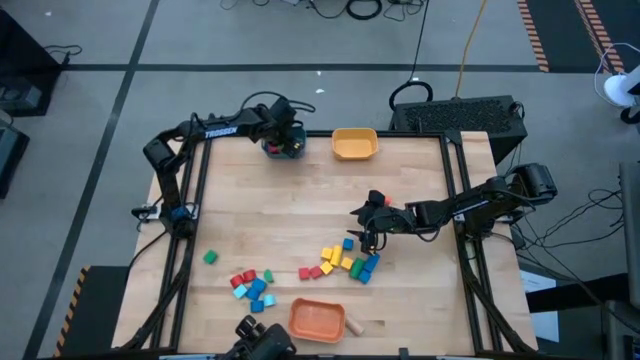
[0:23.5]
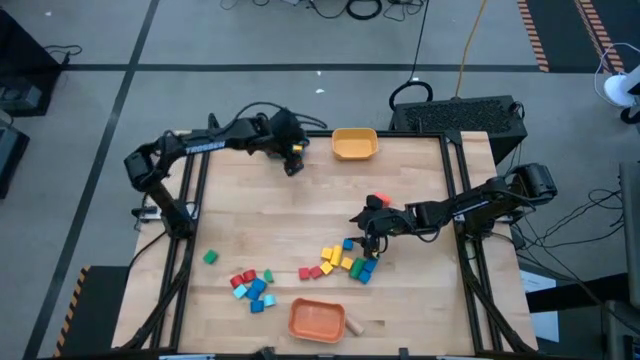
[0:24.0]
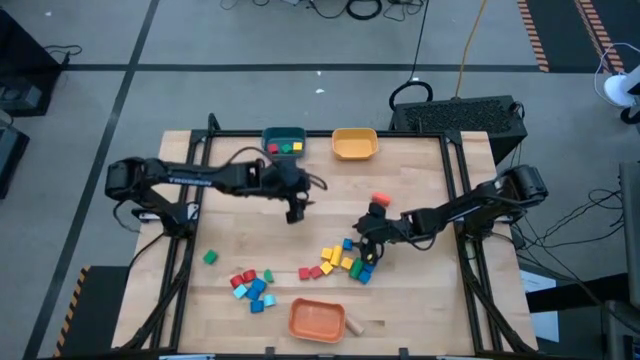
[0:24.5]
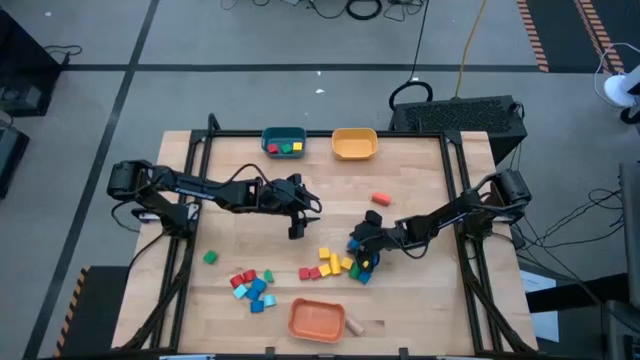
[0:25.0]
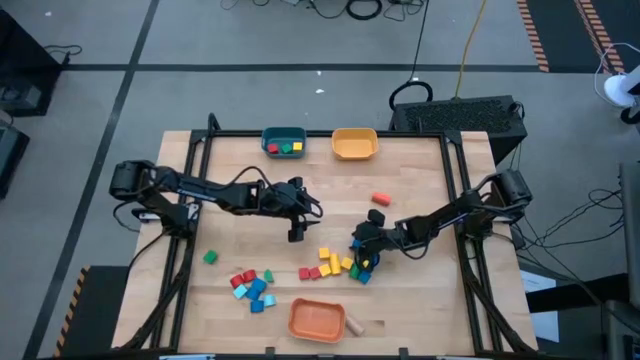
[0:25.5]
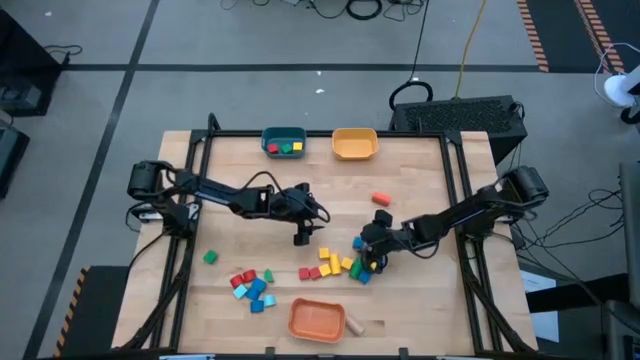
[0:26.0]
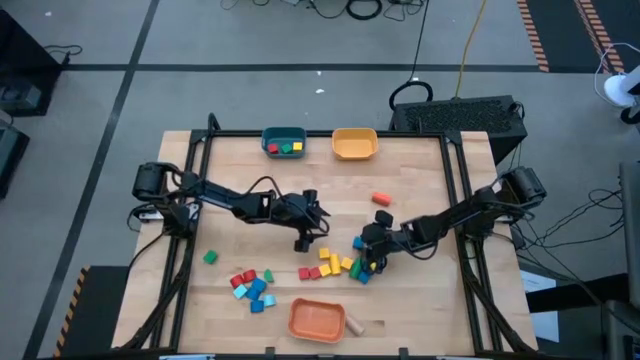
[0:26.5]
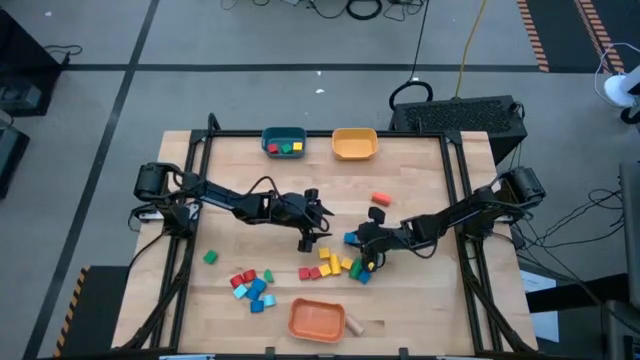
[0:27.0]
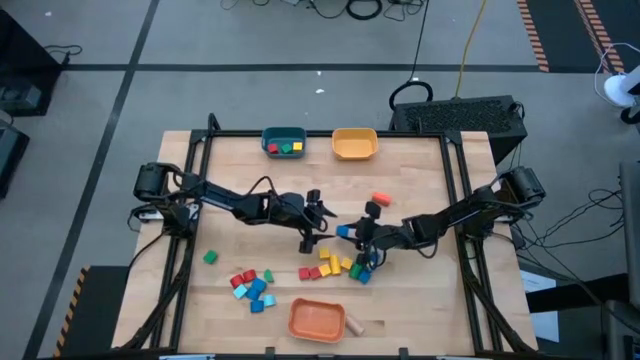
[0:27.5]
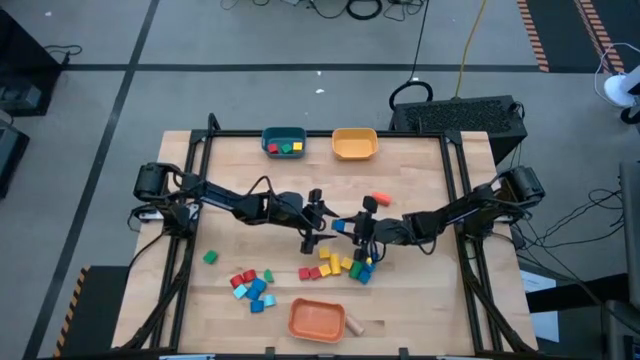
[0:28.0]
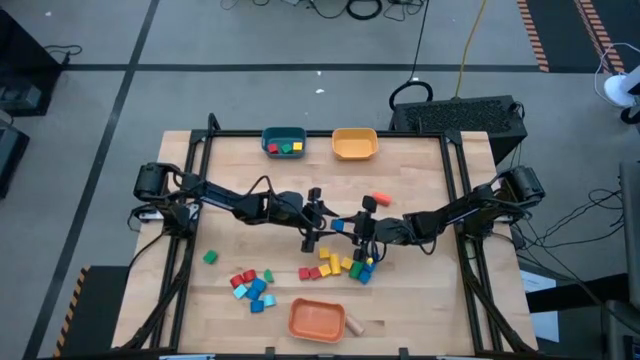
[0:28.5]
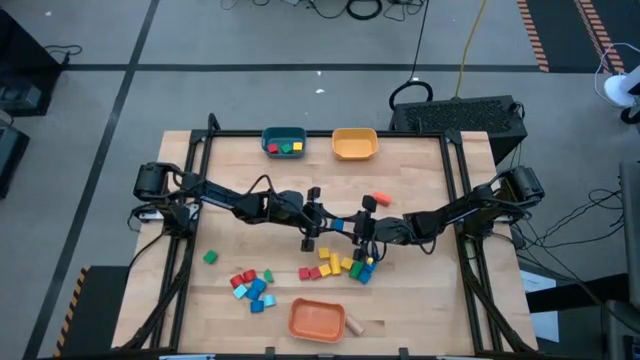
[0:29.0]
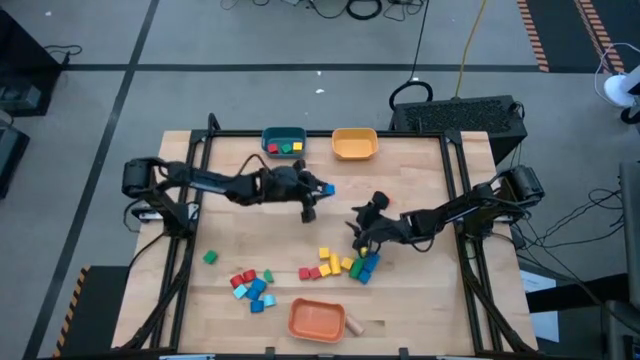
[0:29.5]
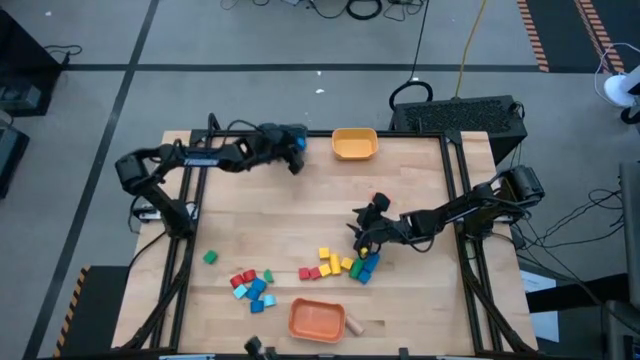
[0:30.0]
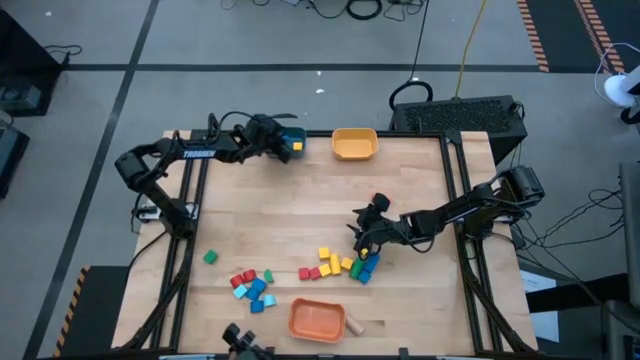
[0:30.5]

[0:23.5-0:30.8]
Task: Sort blocks by size
Put the blue square block into the blue bin

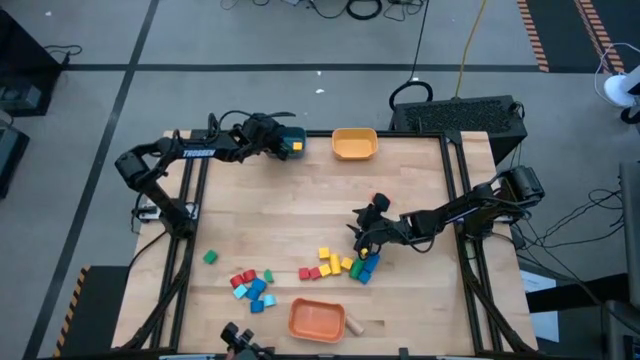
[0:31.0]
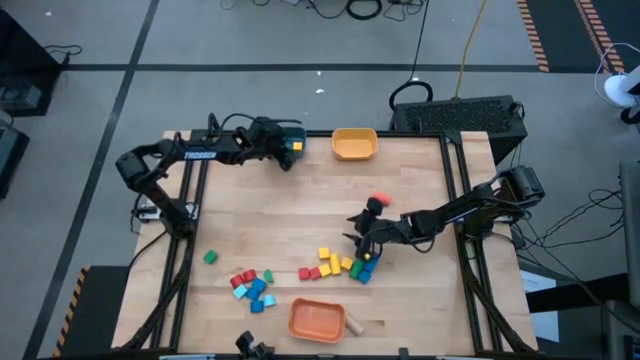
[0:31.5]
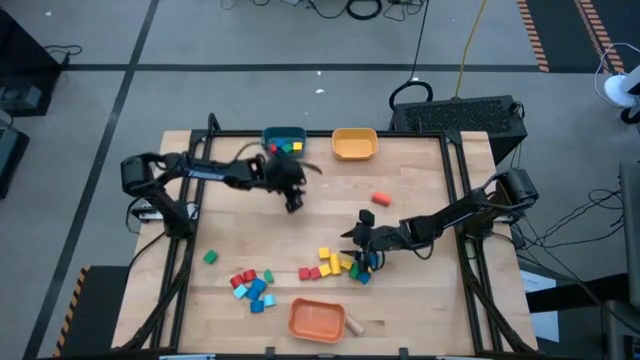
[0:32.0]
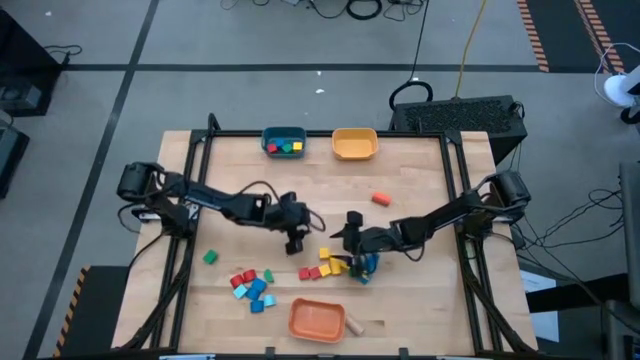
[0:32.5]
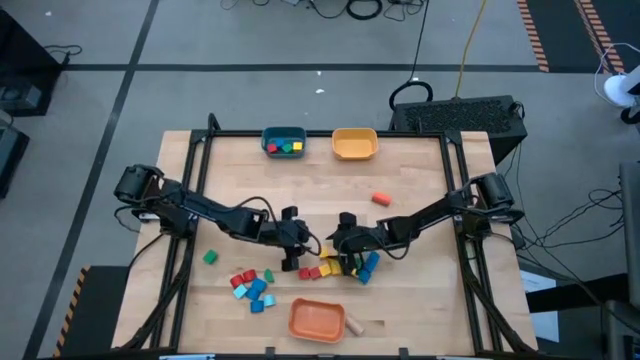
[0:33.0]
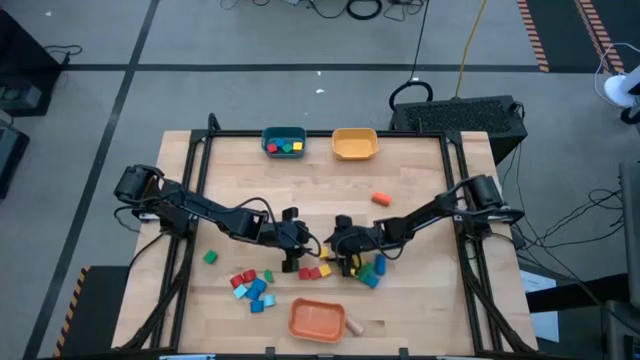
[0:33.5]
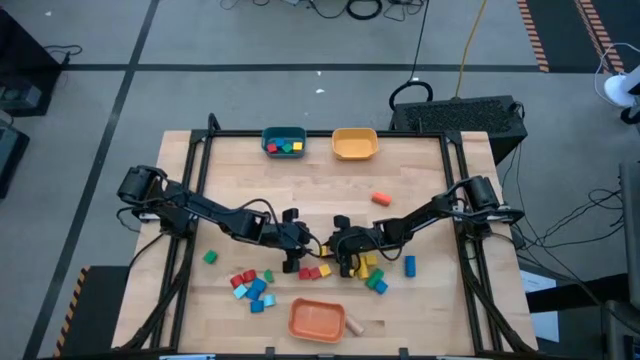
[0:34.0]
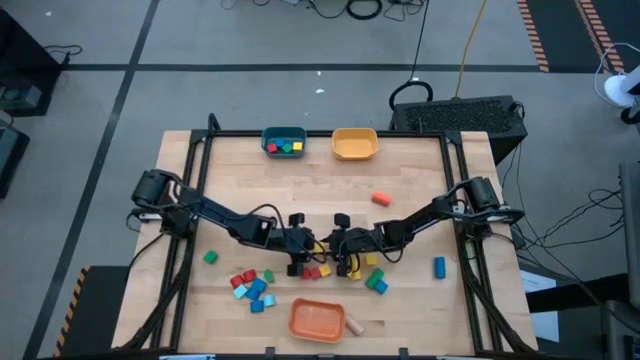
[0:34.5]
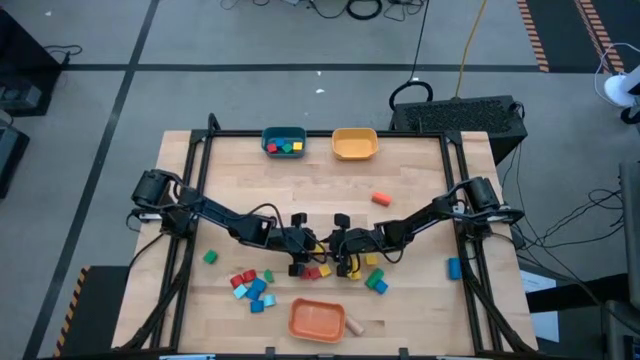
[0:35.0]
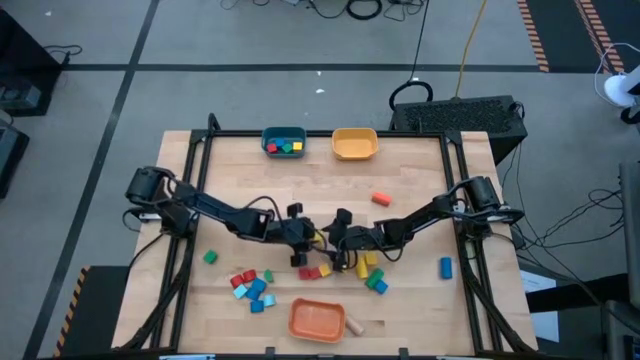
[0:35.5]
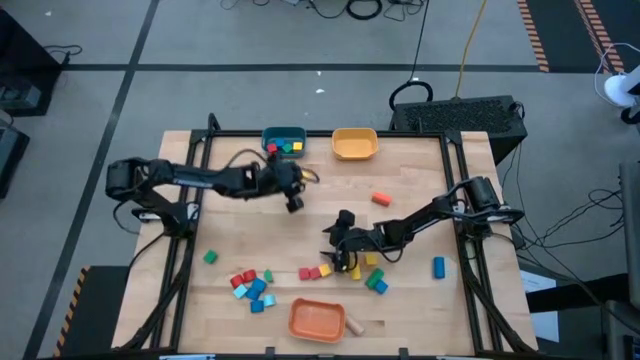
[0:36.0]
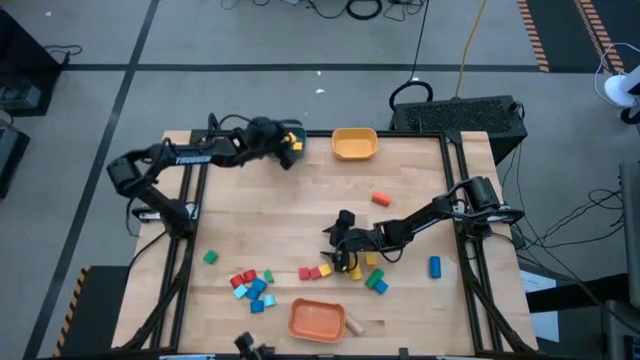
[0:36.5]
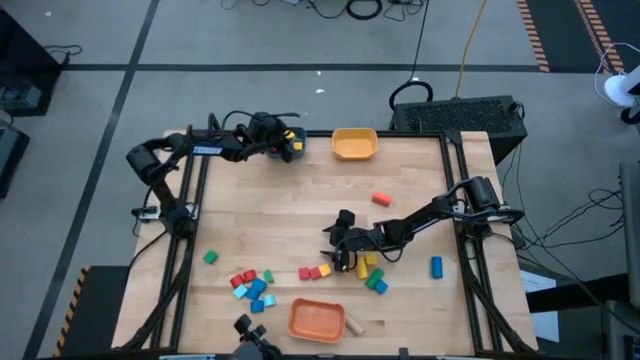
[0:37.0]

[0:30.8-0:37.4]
Put the yellow square block into the blue bin

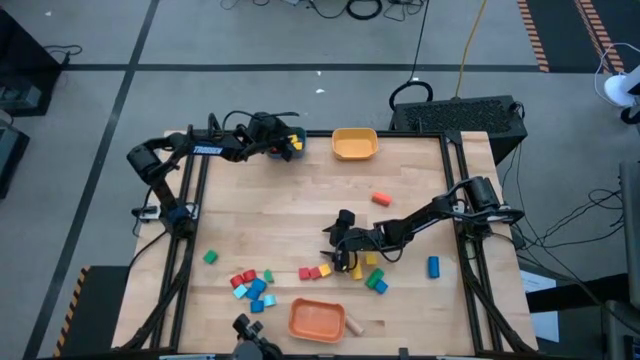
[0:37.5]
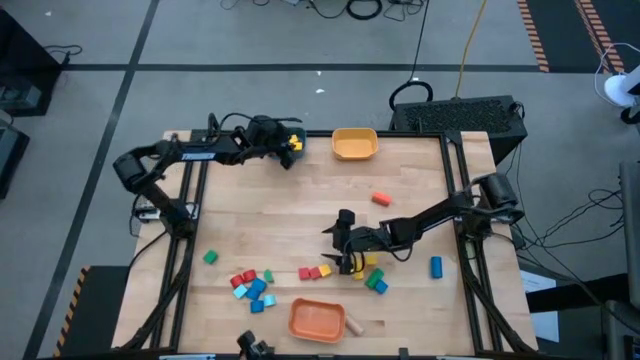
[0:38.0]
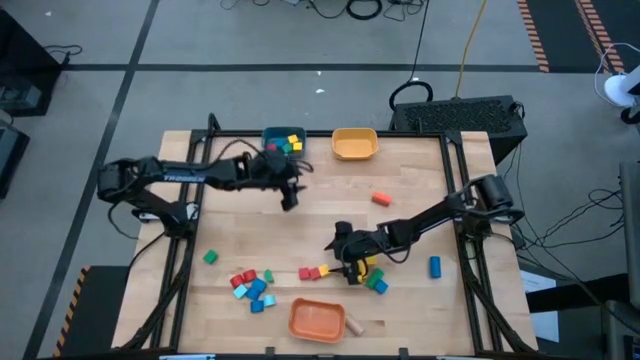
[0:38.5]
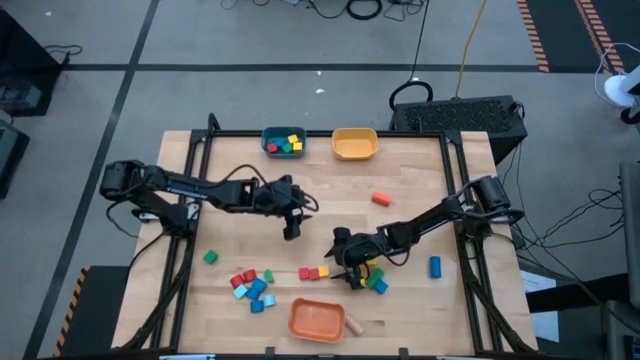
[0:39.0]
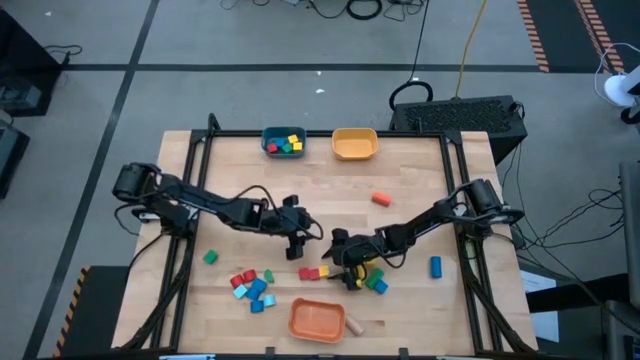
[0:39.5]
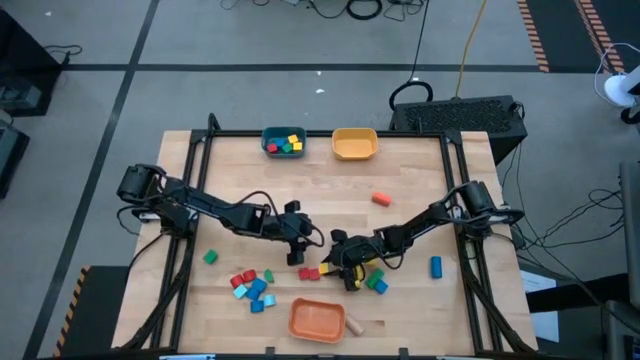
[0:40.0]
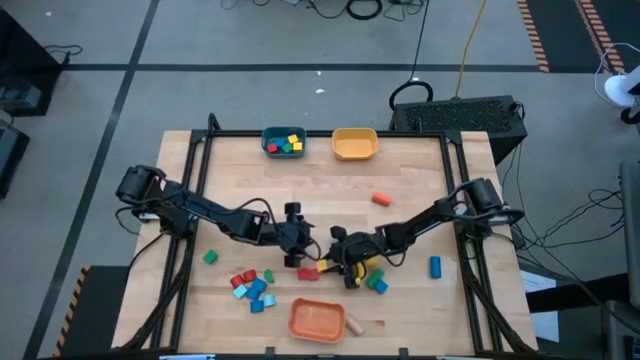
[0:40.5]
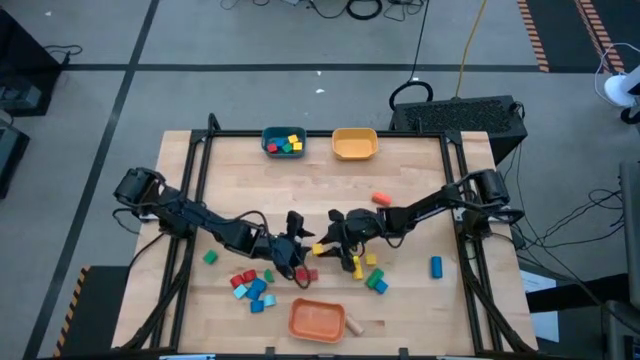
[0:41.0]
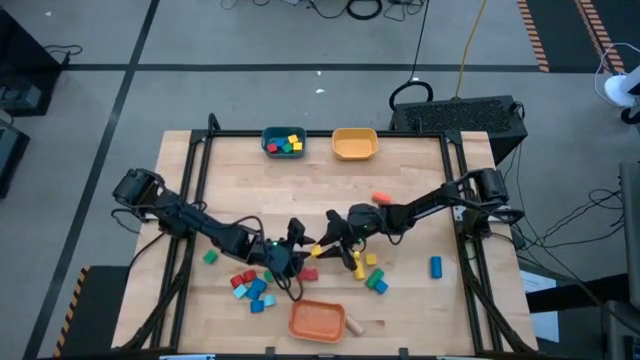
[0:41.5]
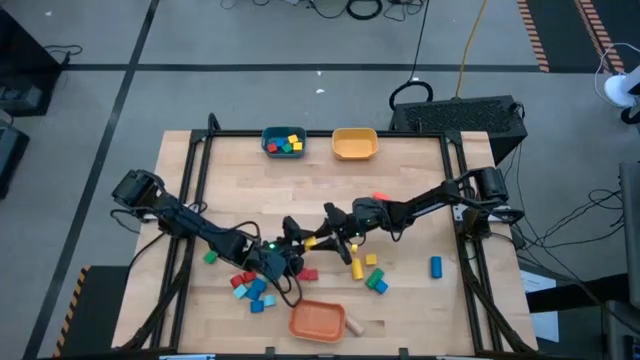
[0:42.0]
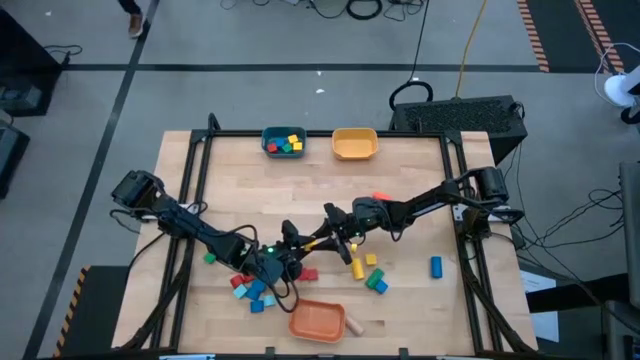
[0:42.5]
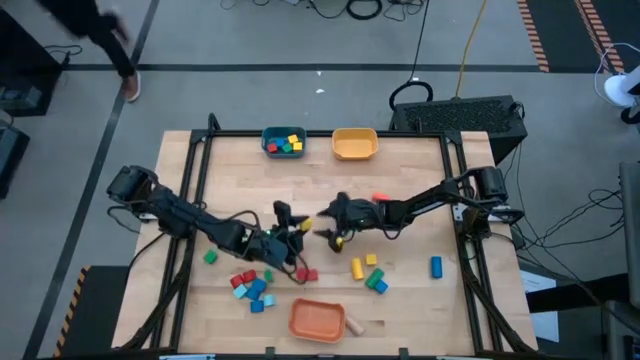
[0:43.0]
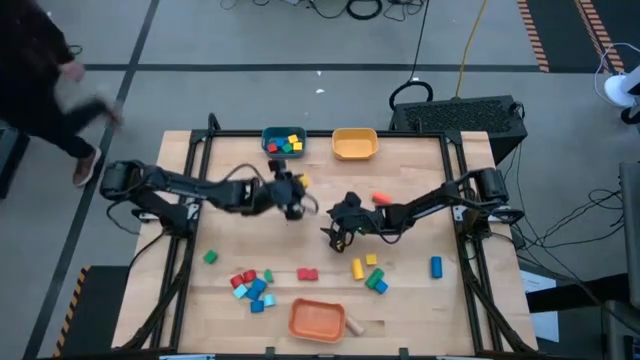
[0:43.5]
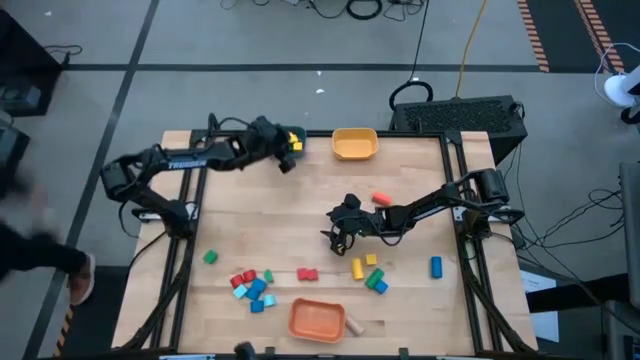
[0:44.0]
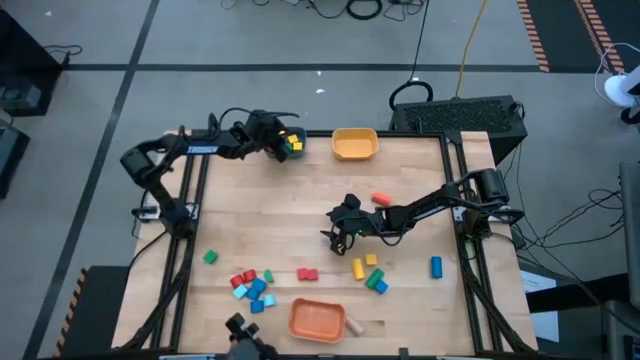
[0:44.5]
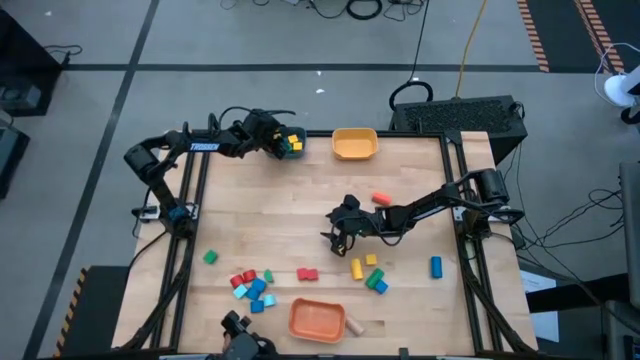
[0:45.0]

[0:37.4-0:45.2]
Put the yellow square block into the blue bin
